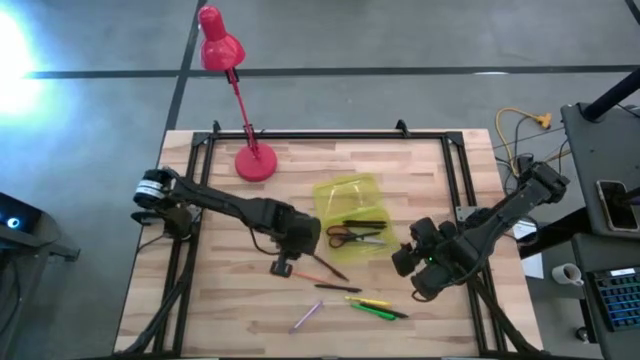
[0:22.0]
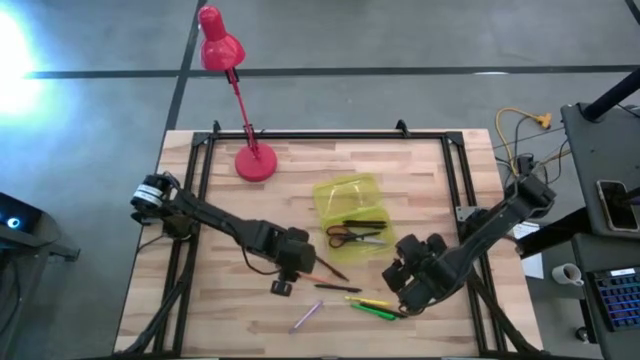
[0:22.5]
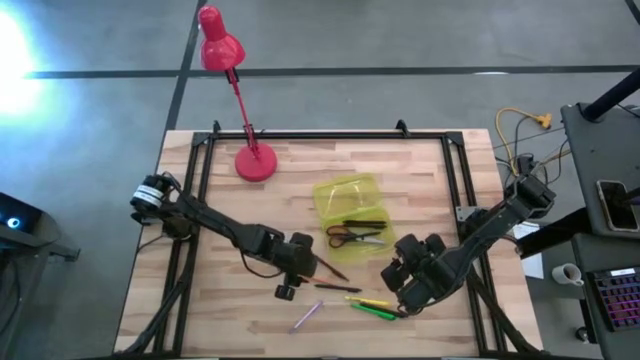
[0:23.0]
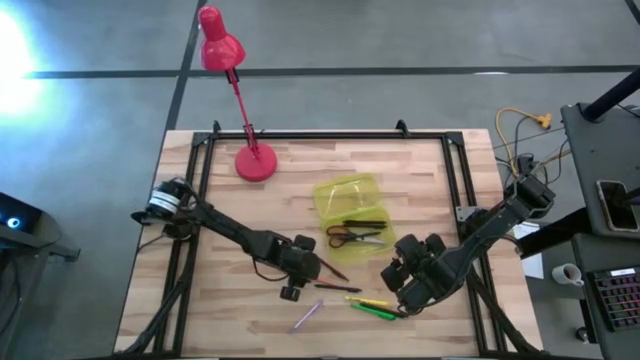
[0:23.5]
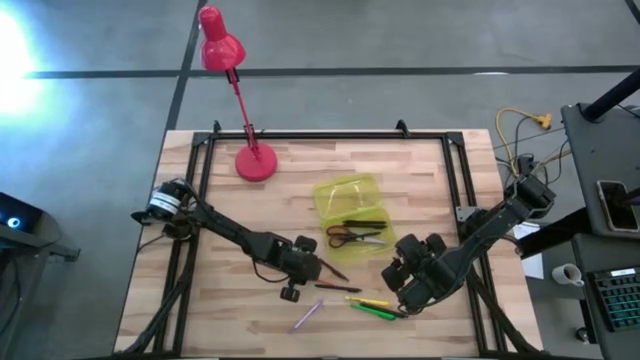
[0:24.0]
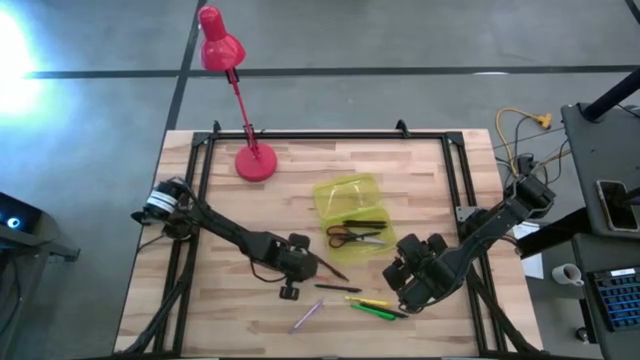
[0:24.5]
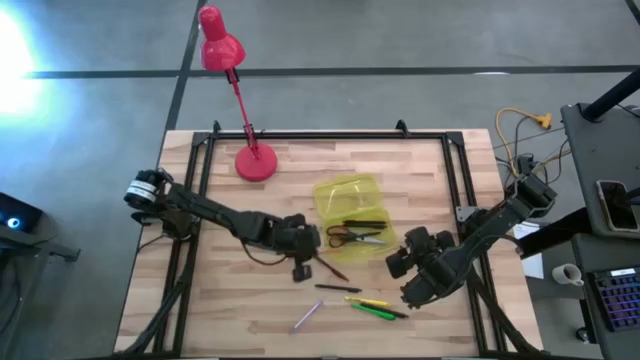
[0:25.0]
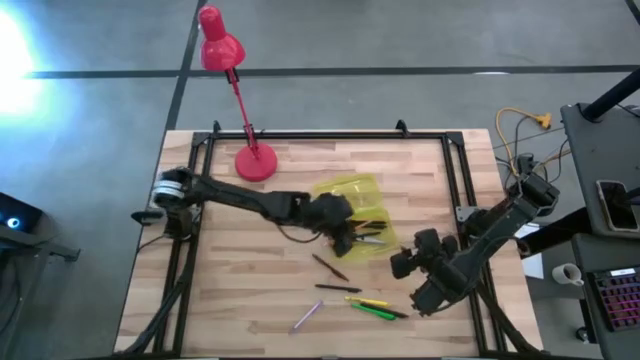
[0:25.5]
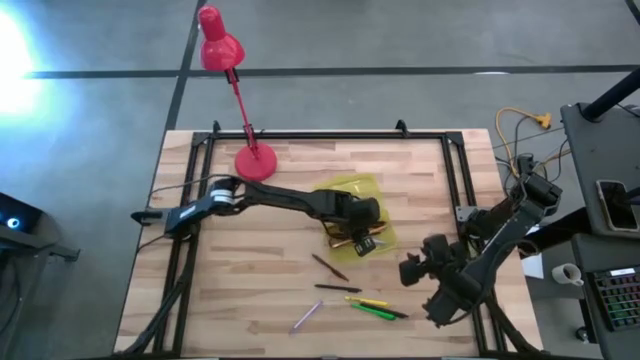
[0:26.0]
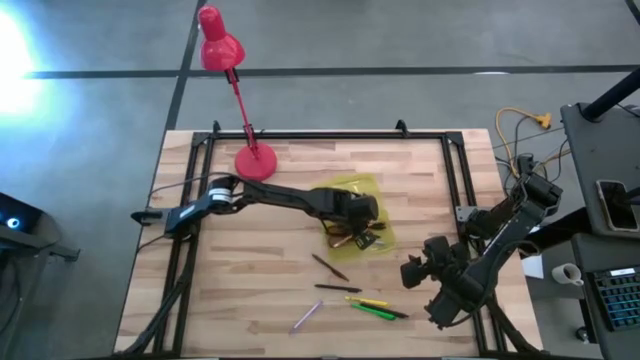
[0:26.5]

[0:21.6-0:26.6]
Task: Pick & place school supplies into a supply box
Put the orange pencil into the yellow supply box

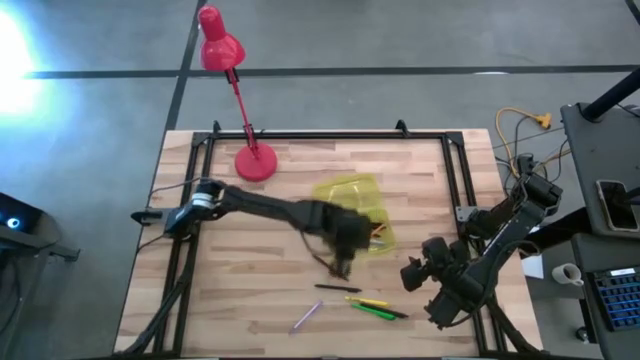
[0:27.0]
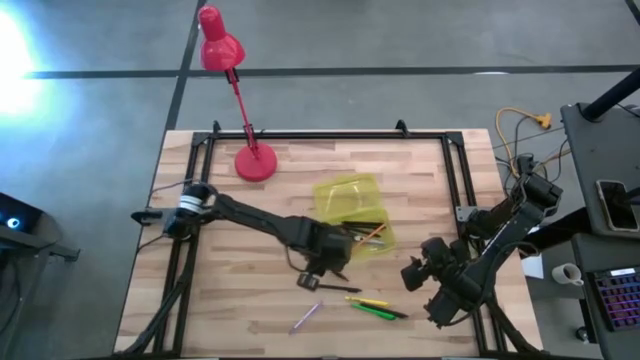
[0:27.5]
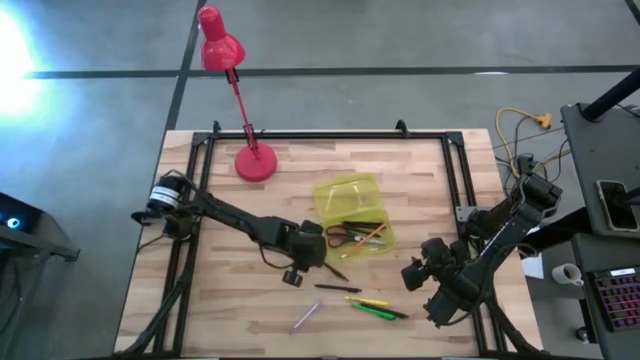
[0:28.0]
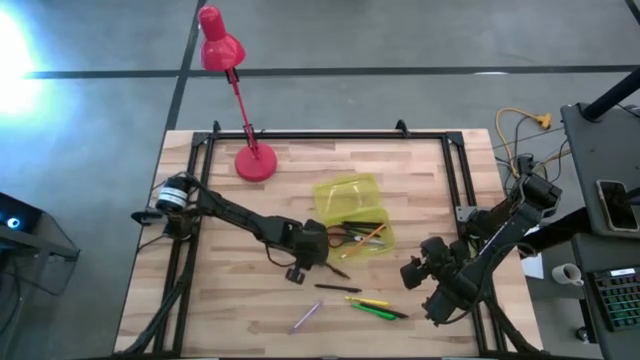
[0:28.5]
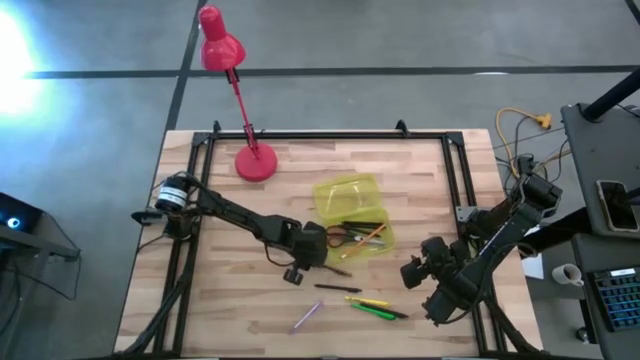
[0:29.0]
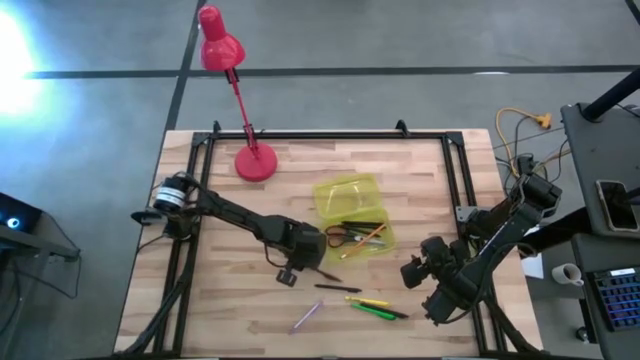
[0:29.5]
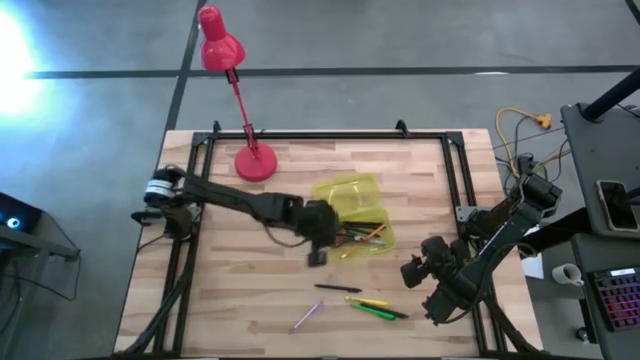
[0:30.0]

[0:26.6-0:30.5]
Put the brown pen into the yellow supply box

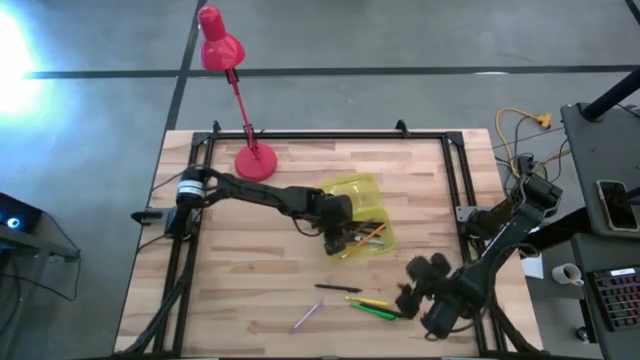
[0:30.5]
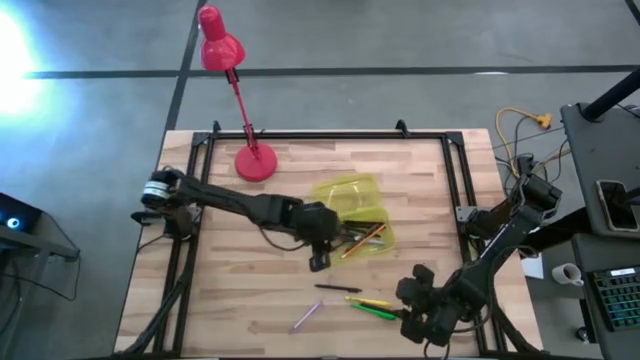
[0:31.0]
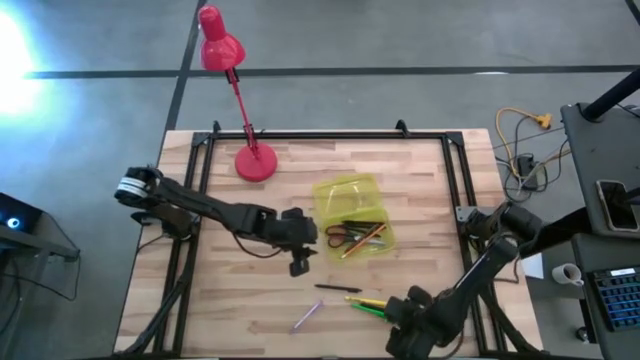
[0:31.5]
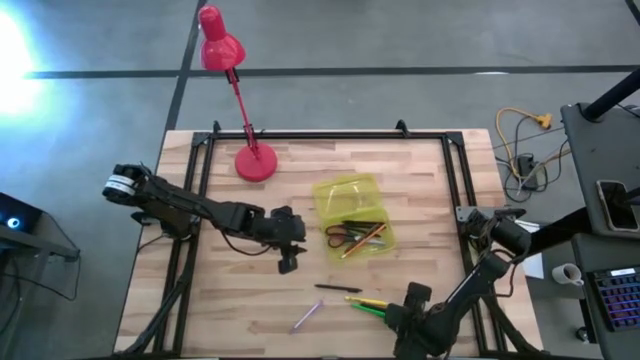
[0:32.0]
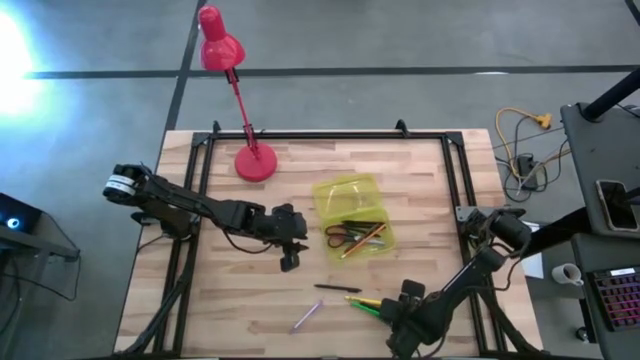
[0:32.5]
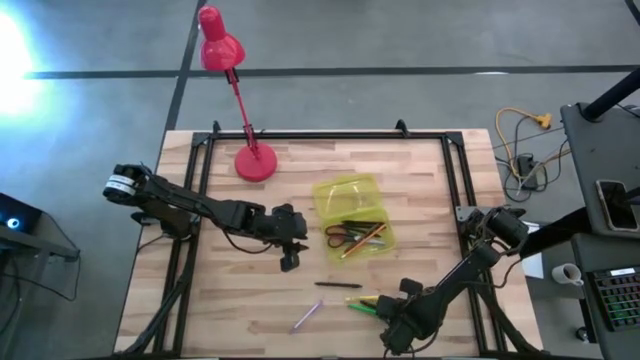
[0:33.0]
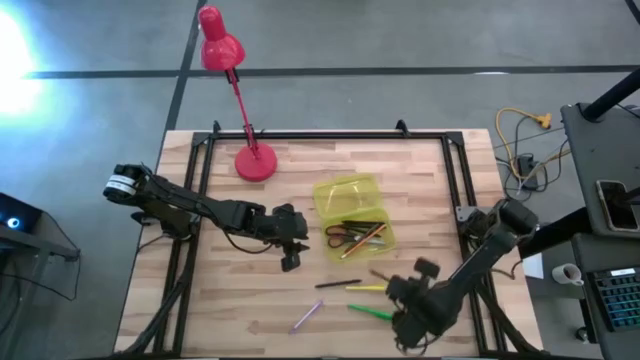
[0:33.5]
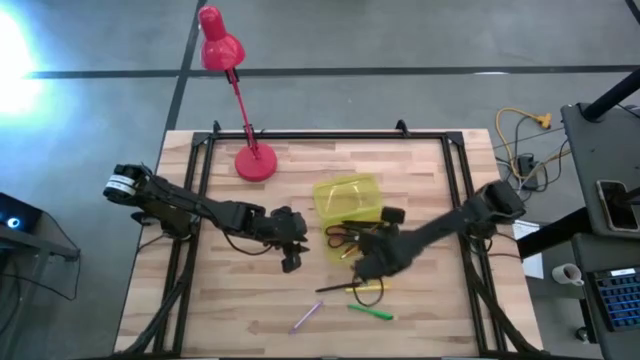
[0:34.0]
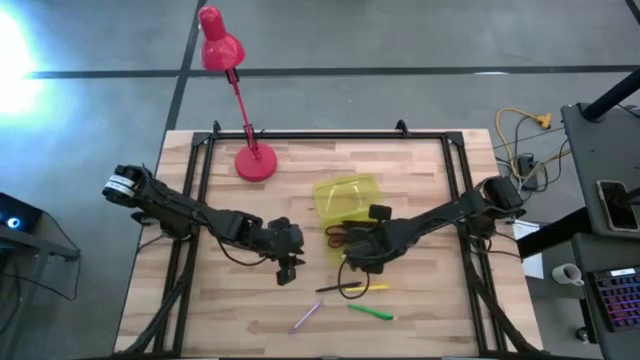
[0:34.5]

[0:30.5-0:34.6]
Put the black pen into the yellow supply box

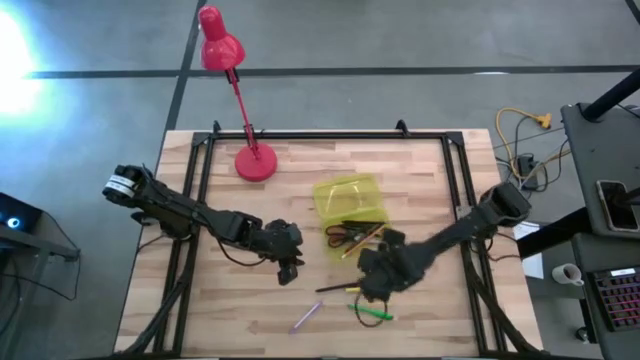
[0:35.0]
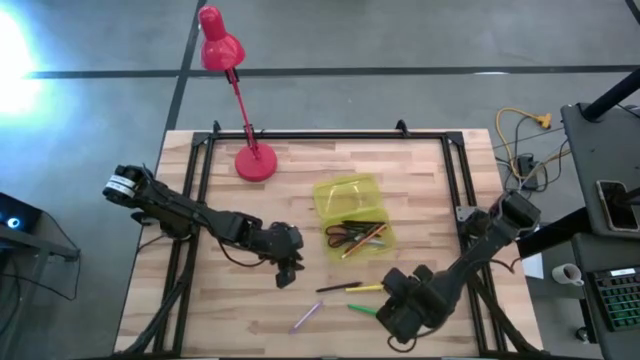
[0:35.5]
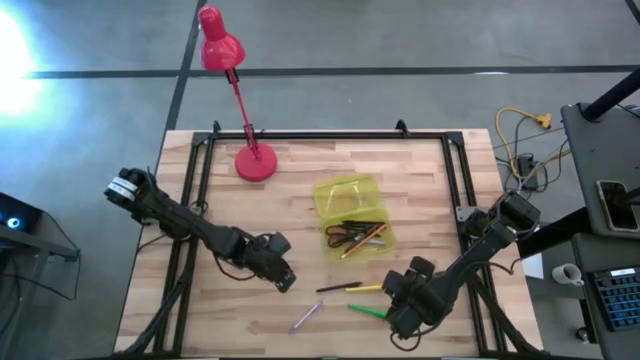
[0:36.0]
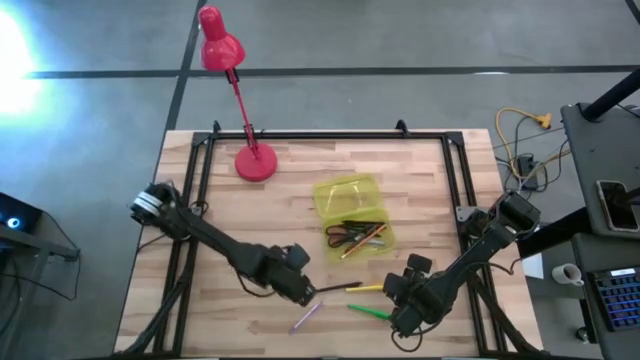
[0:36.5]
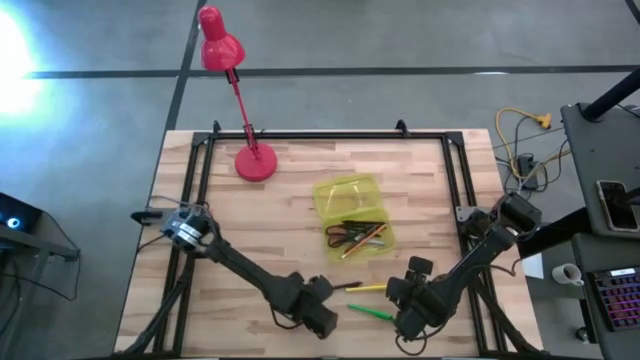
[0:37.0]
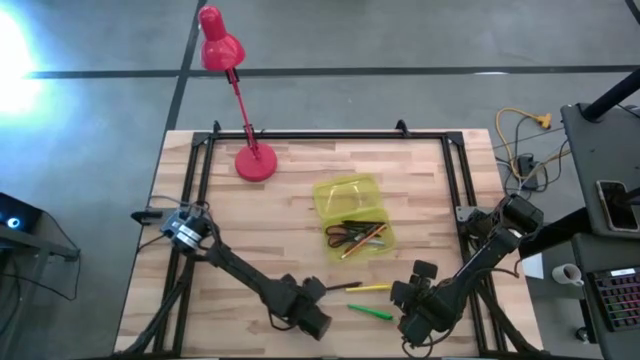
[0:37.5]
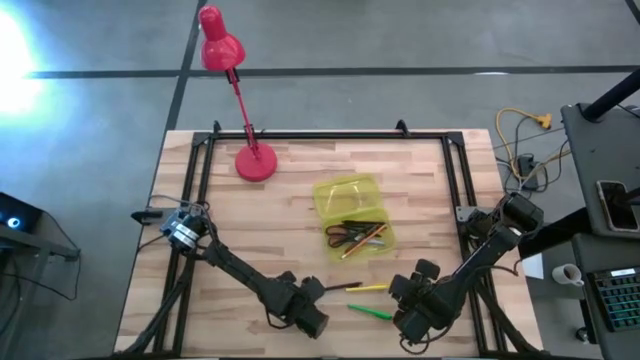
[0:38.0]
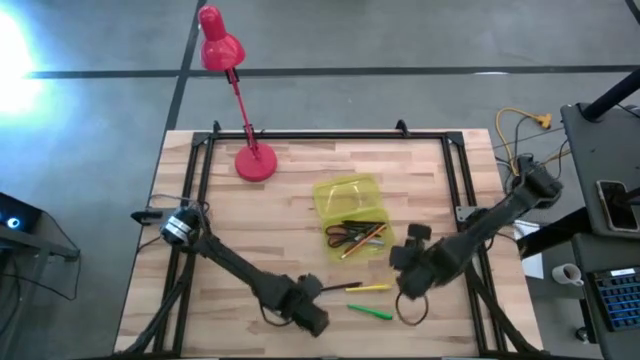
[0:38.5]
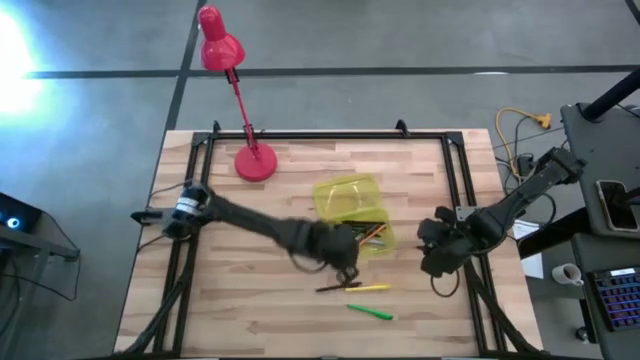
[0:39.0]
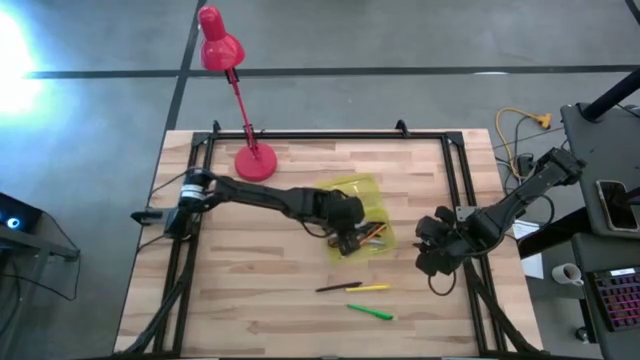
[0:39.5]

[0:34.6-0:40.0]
Put the purple pen into the yellow supply box

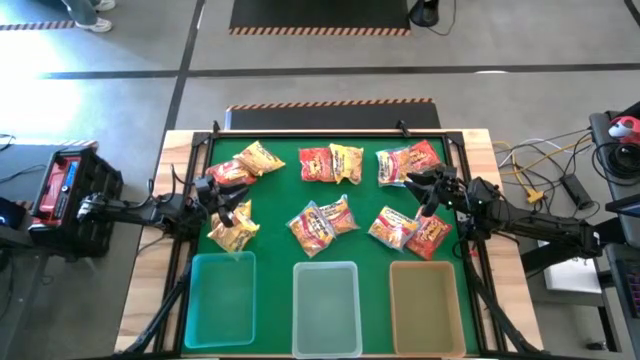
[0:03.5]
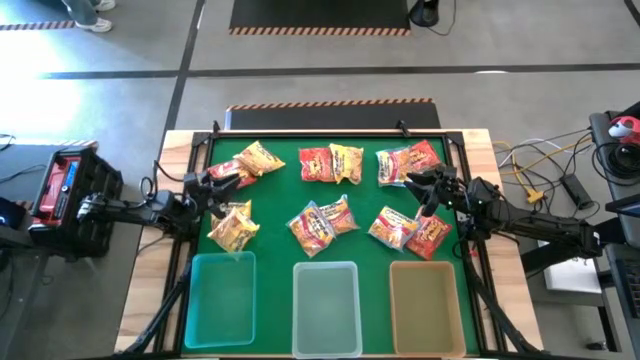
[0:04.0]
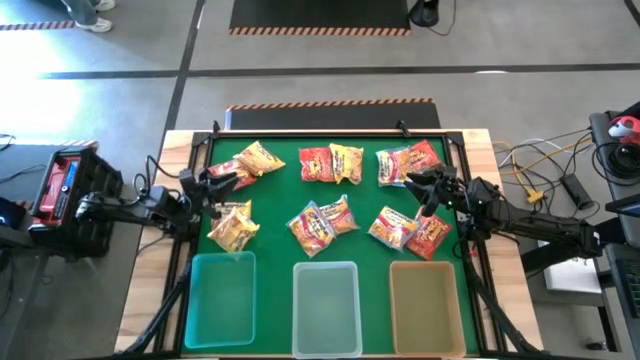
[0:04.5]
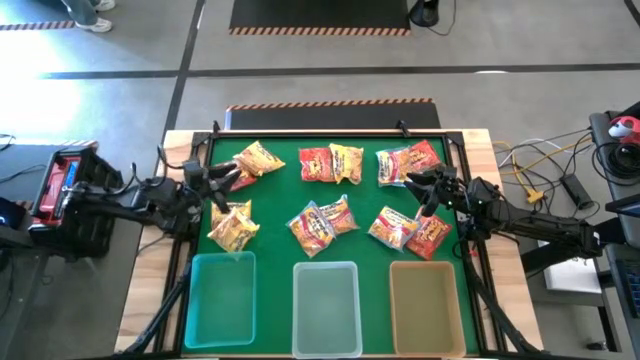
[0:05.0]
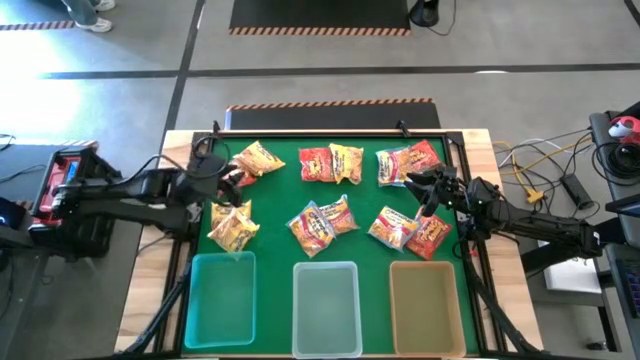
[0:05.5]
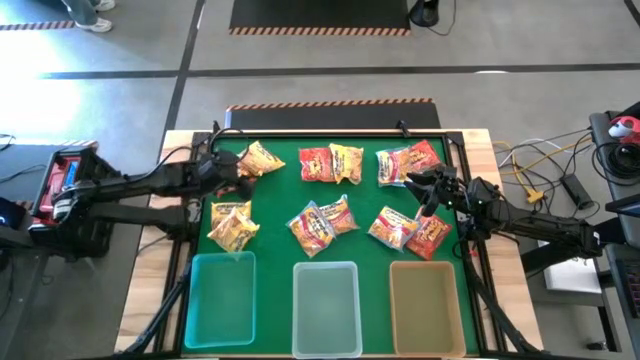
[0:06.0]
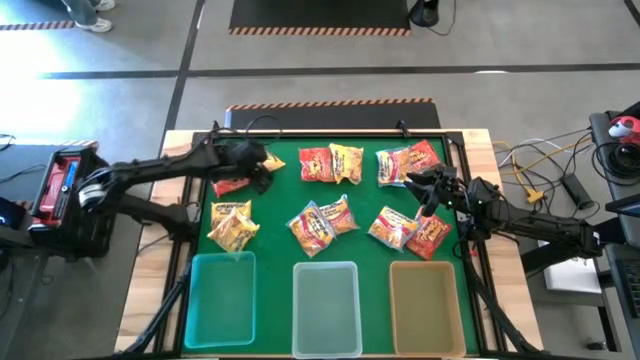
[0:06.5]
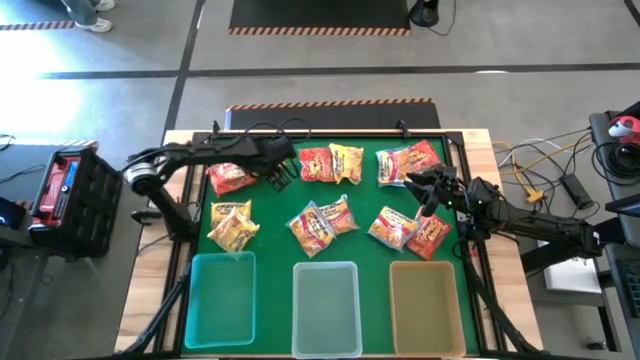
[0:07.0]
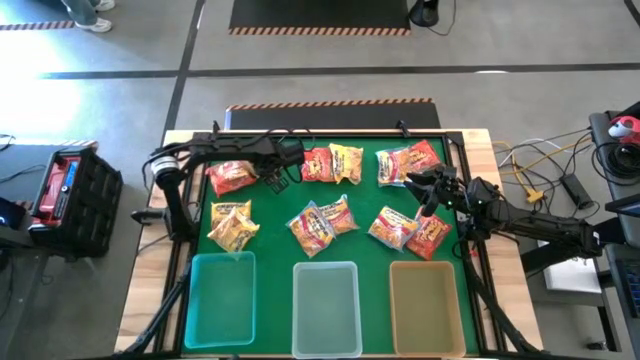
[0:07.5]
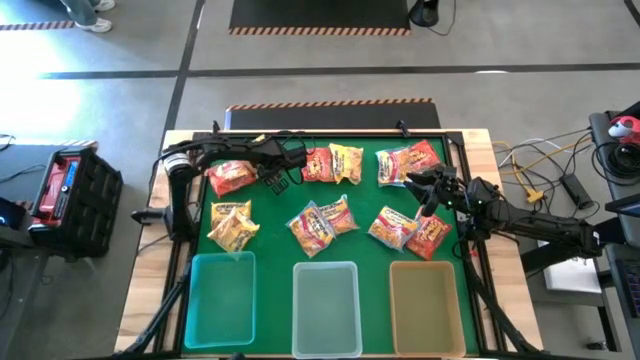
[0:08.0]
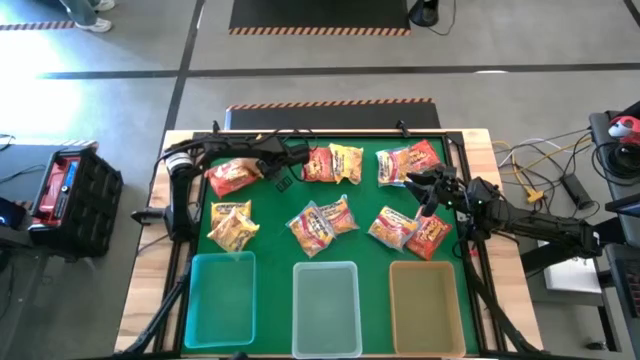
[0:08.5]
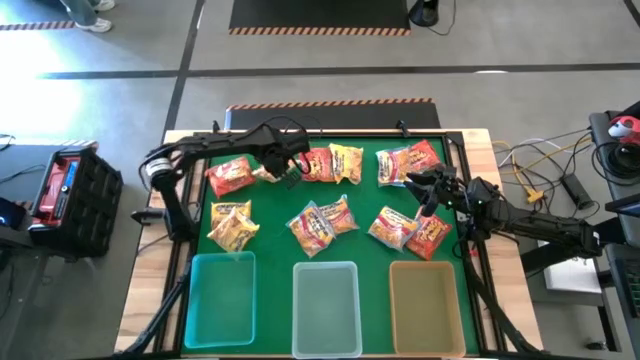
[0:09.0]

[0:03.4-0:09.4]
Task: Sort Maruchan noodles
Put the yellow noodle pack into the transparent bin
